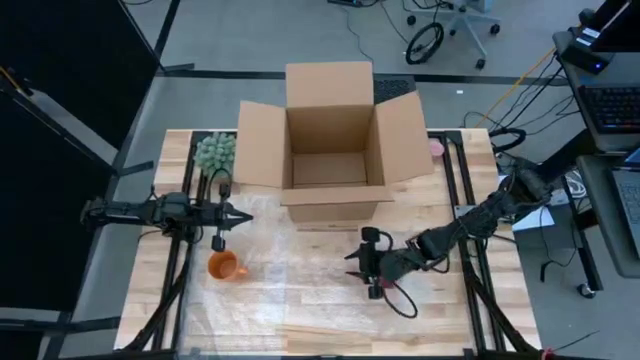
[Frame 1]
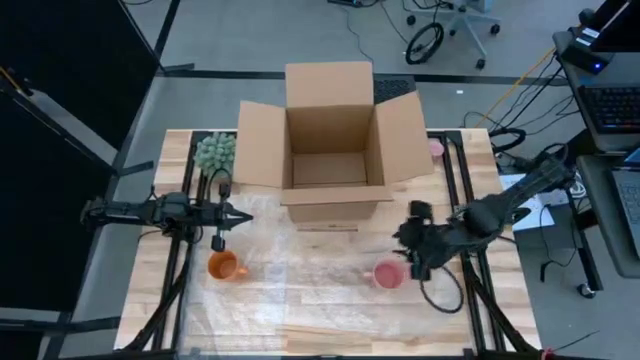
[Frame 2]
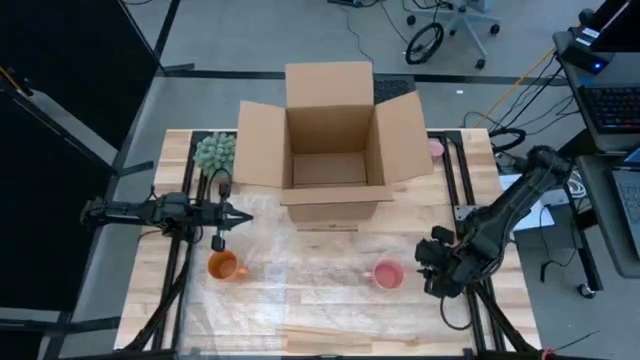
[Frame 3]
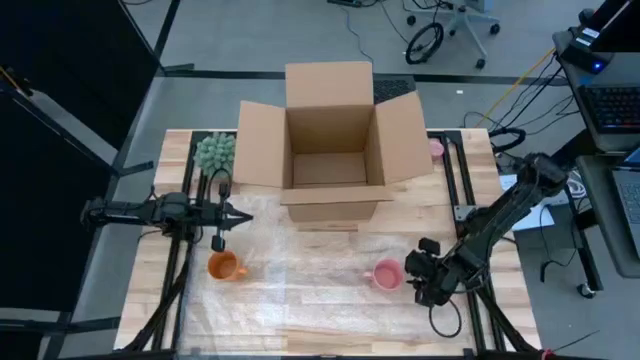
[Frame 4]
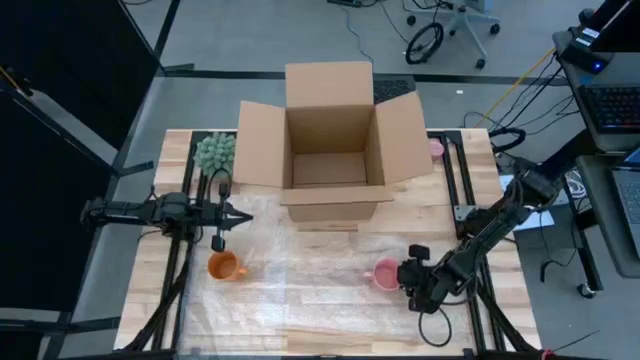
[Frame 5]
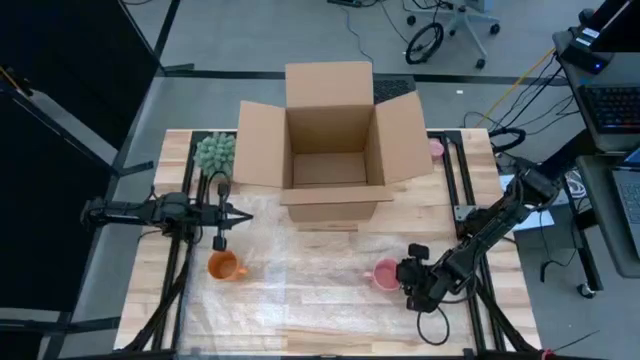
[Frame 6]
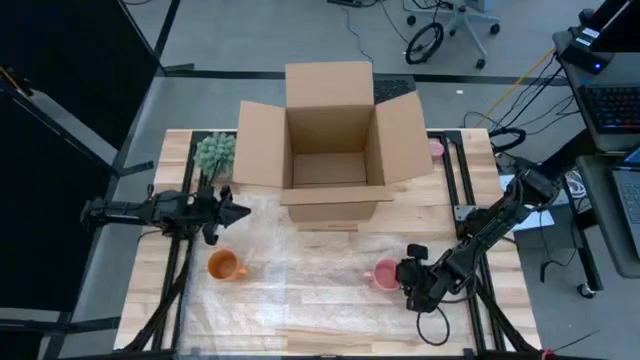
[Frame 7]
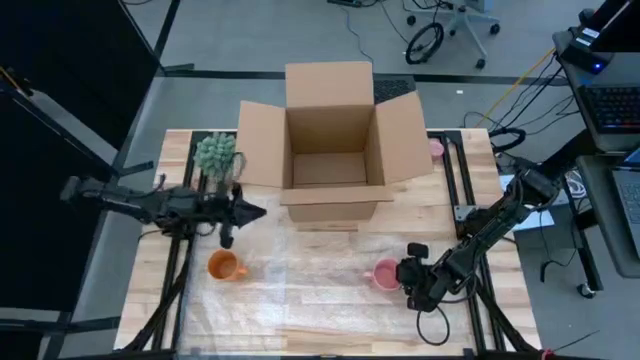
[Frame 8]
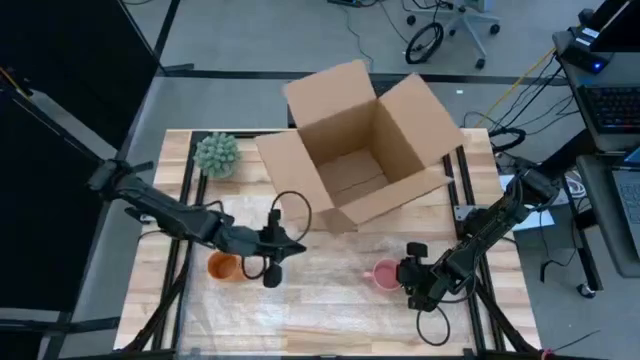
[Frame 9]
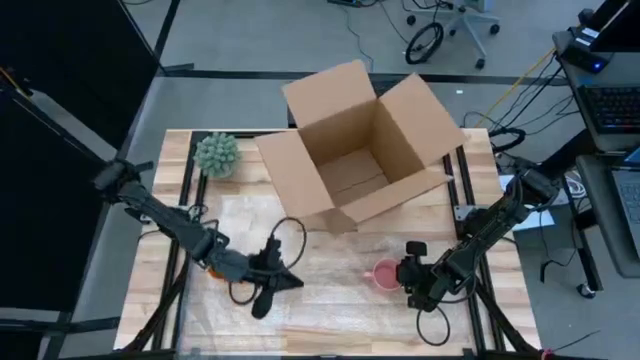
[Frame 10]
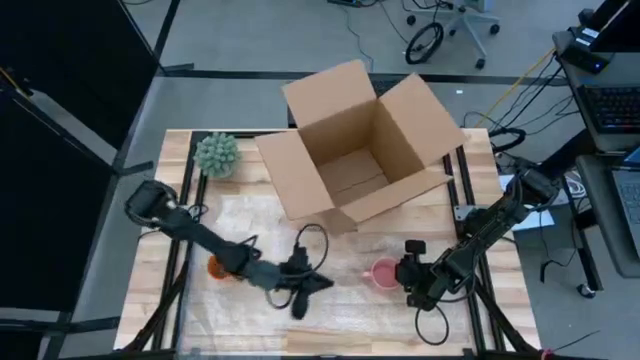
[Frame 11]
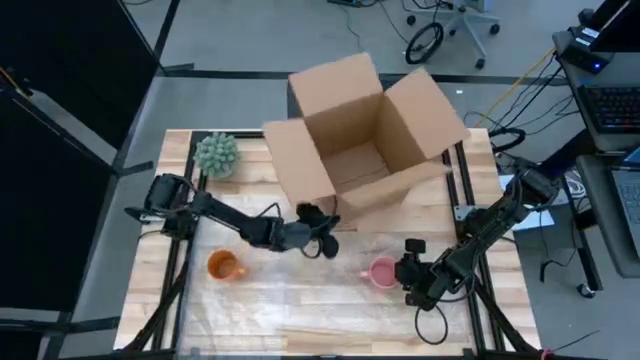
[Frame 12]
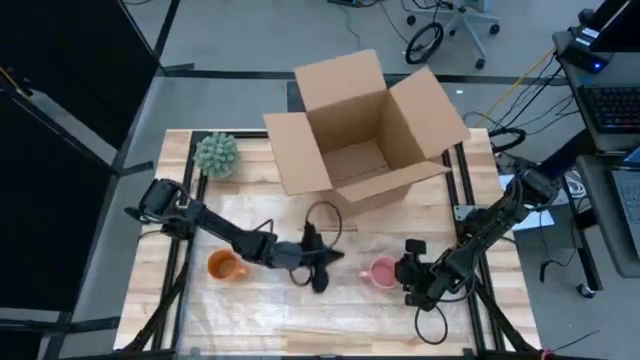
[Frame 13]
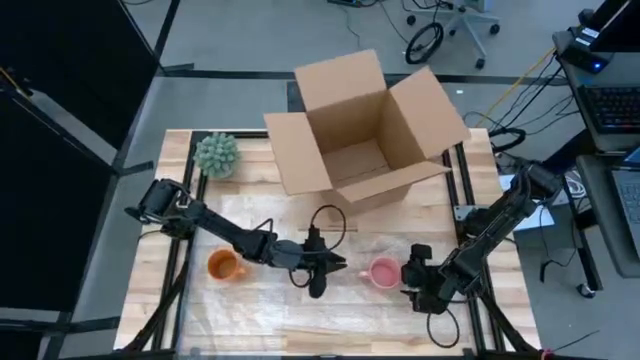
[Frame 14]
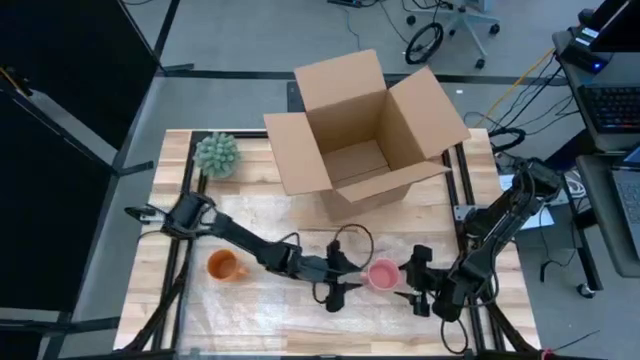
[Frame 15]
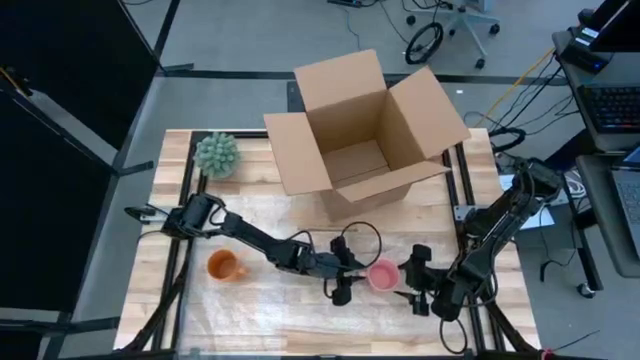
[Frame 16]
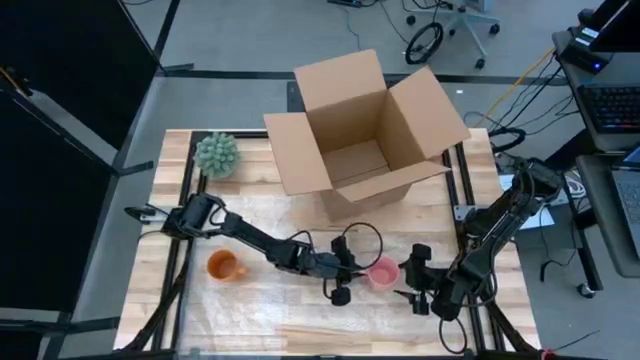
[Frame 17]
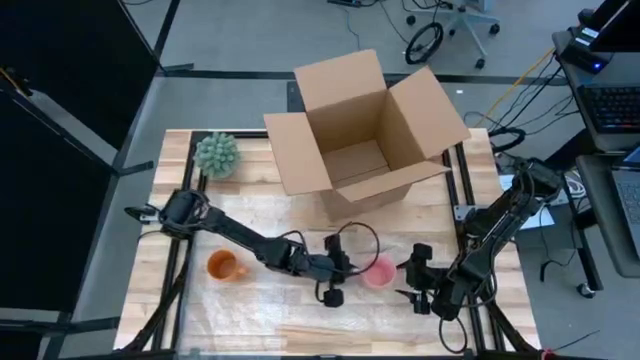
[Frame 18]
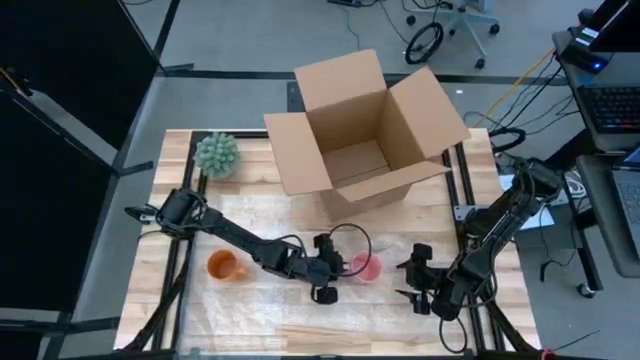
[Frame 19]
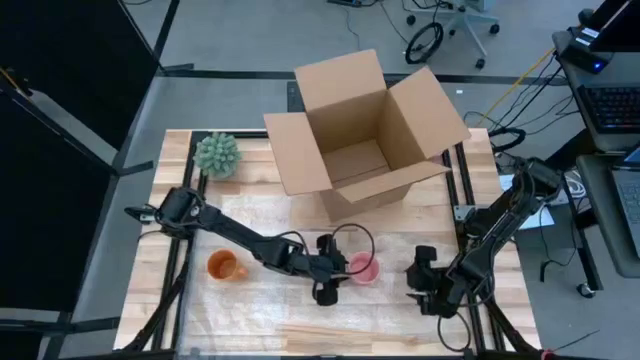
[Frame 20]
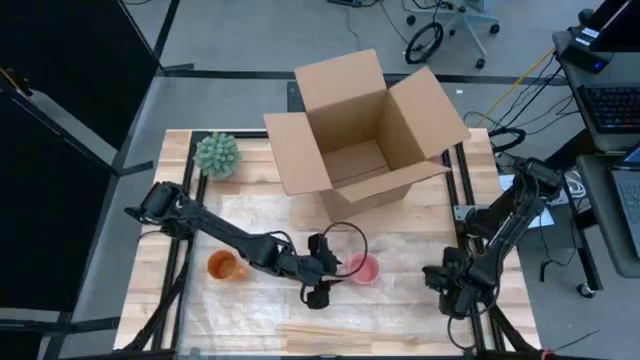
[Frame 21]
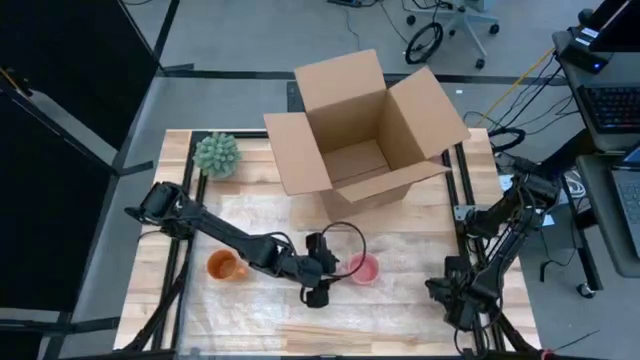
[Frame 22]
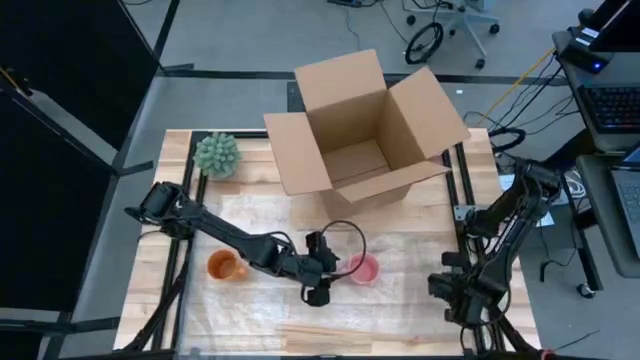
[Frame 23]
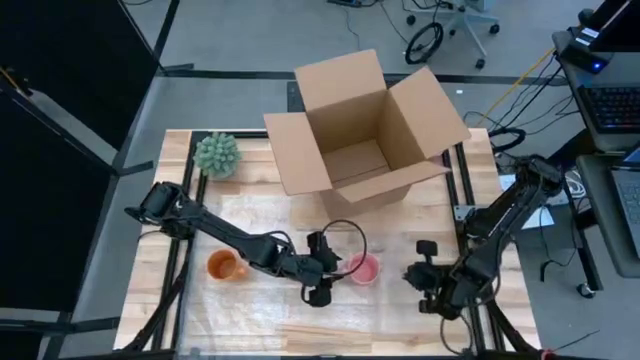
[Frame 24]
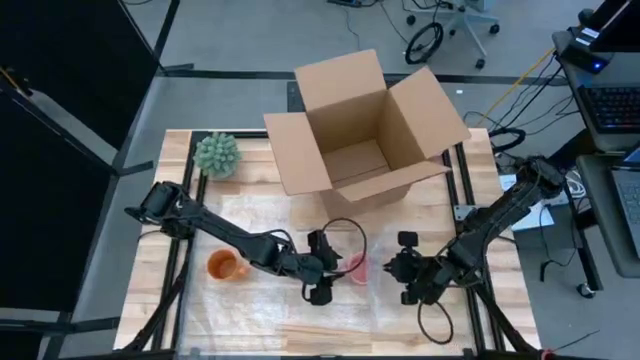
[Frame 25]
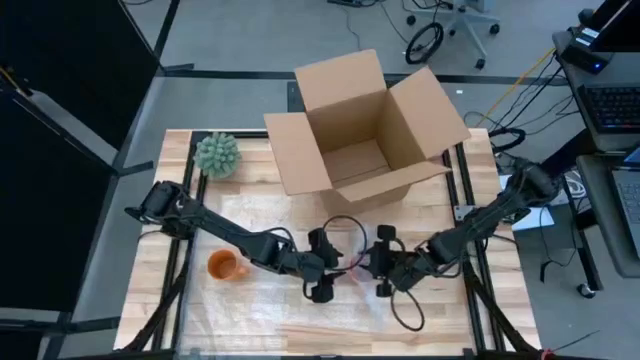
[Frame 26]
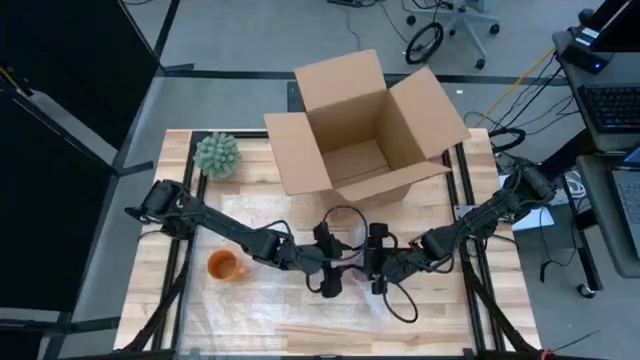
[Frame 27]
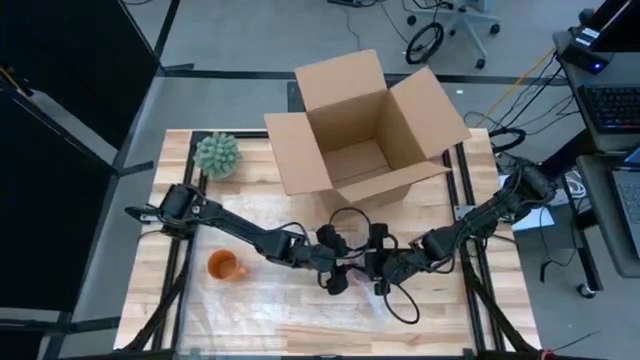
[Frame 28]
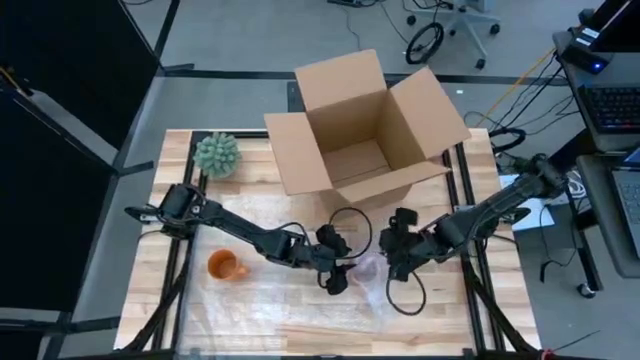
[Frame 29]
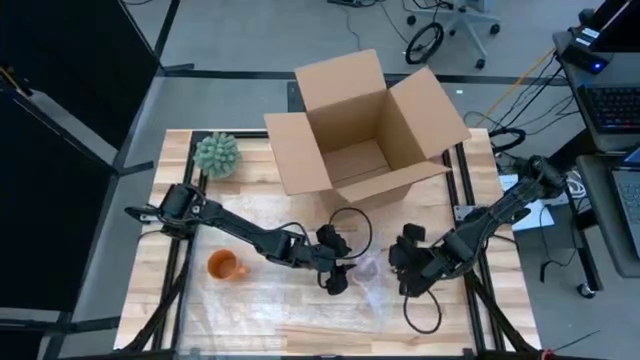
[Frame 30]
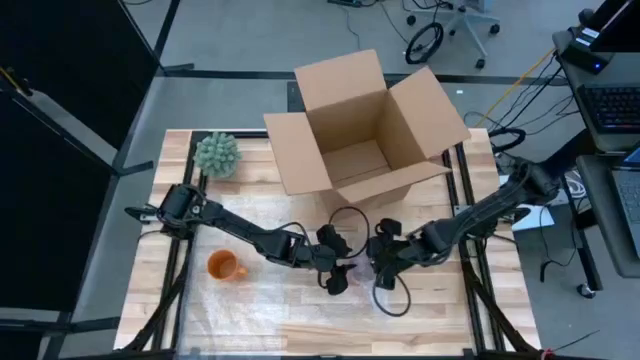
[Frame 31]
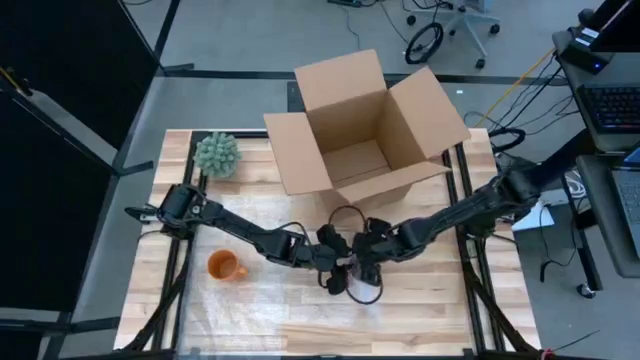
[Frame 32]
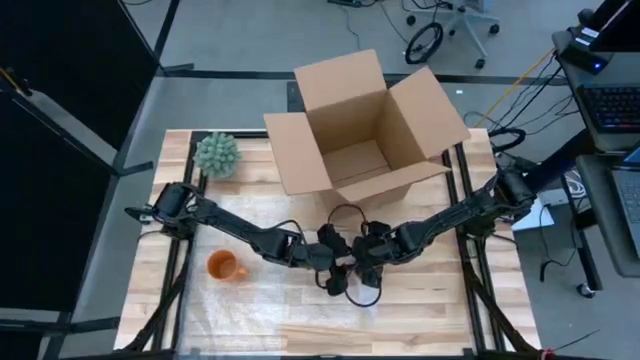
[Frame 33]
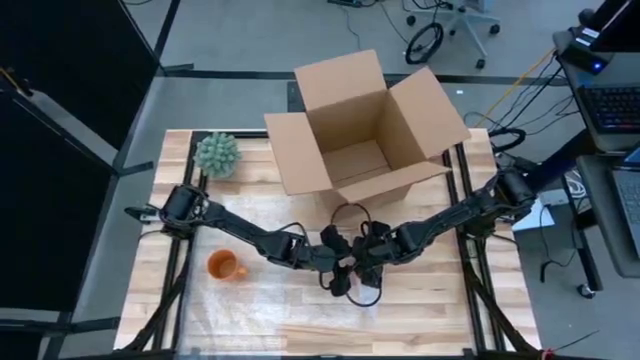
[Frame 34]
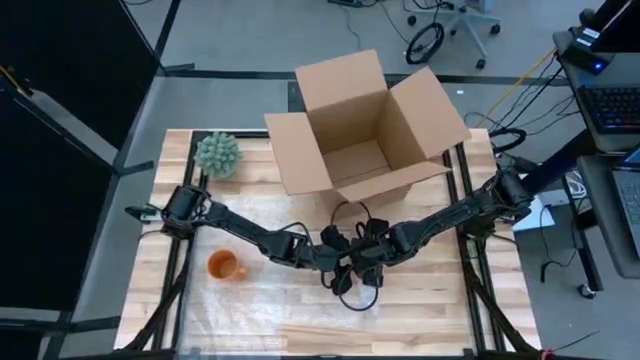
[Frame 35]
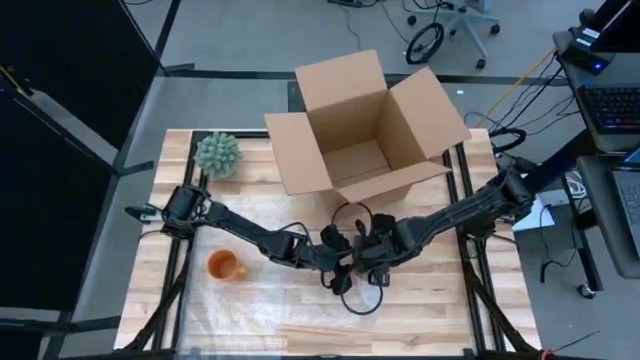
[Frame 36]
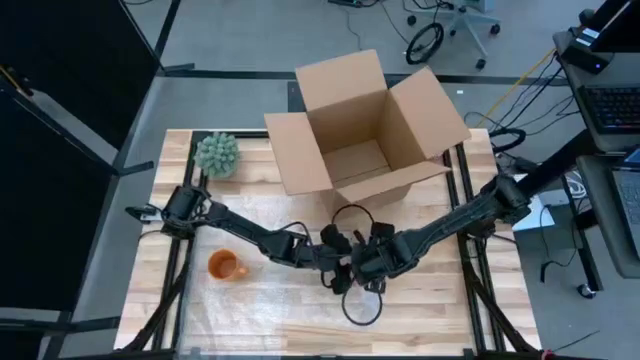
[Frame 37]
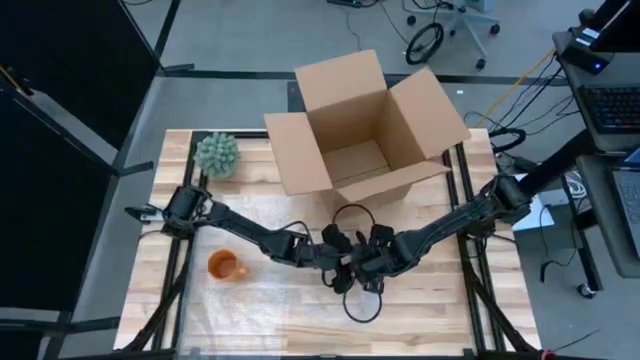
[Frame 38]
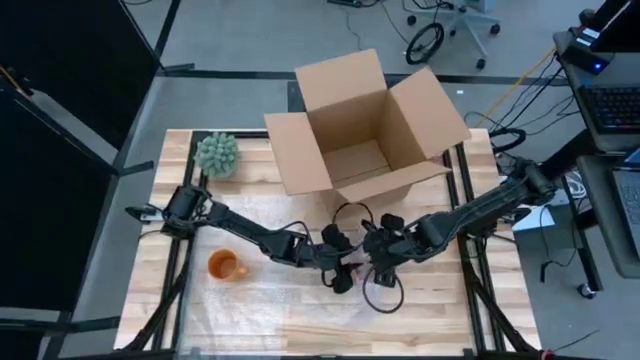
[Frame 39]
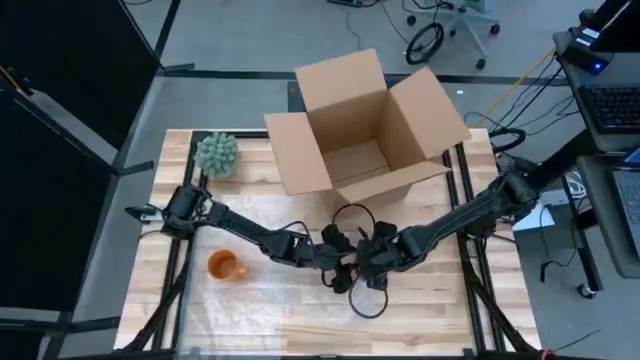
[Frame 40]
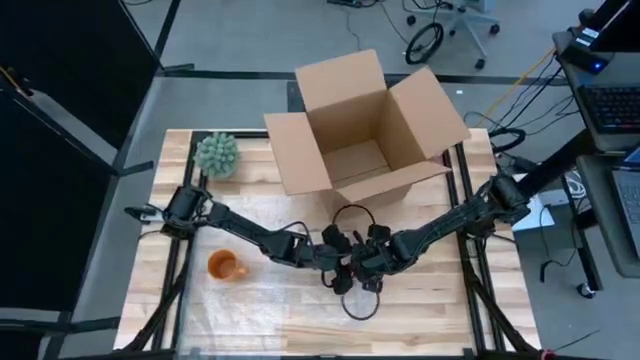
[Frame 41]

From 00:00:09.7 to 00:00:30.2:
Task: wrap mug
Wrap the pink mug with bubble wrap
